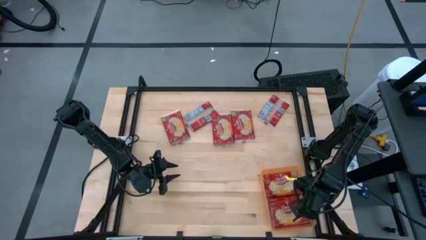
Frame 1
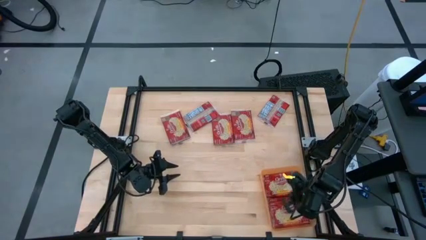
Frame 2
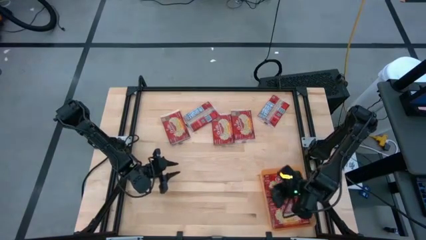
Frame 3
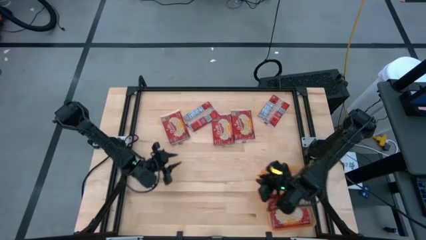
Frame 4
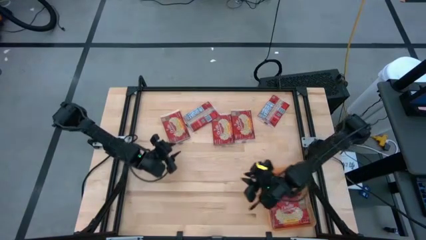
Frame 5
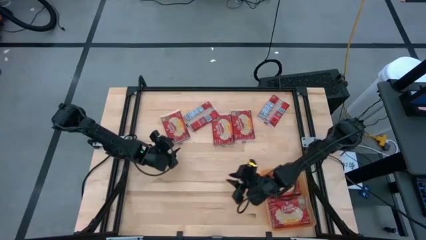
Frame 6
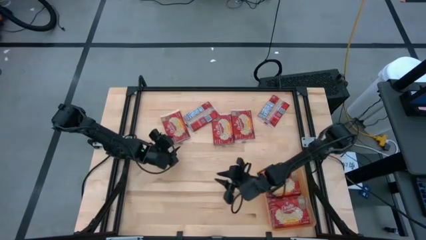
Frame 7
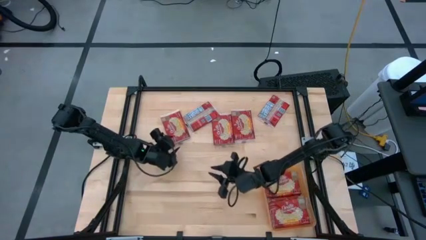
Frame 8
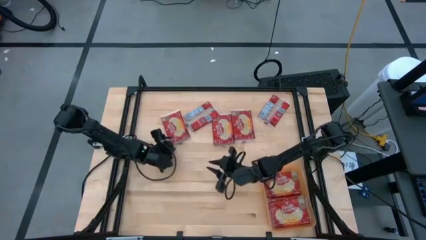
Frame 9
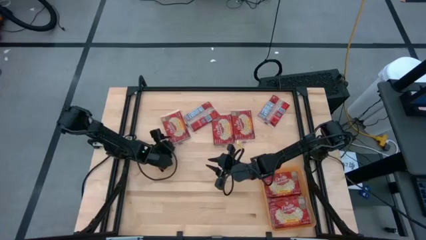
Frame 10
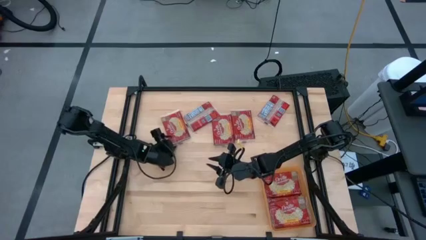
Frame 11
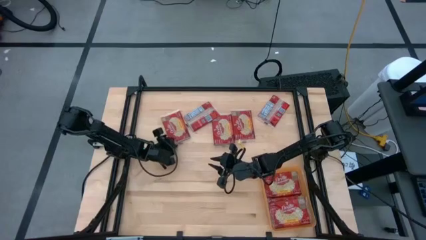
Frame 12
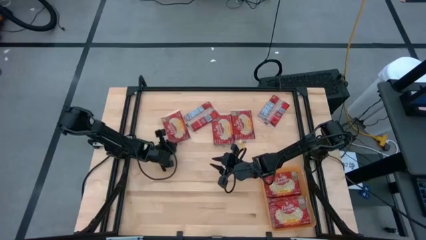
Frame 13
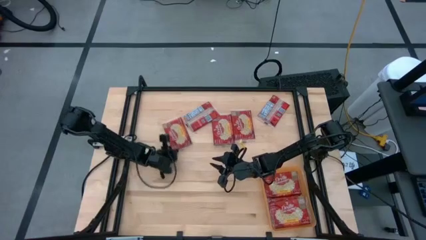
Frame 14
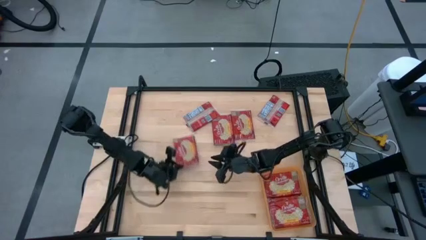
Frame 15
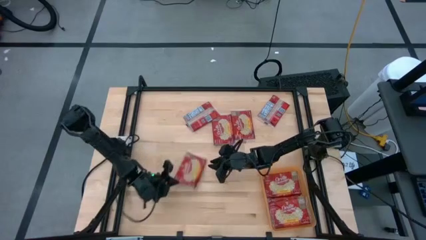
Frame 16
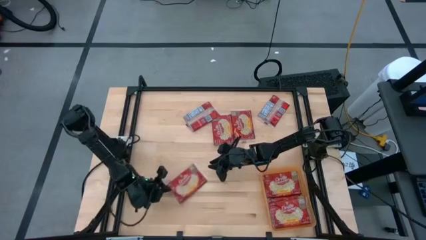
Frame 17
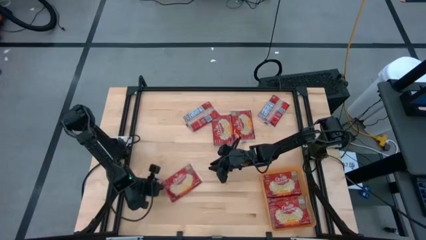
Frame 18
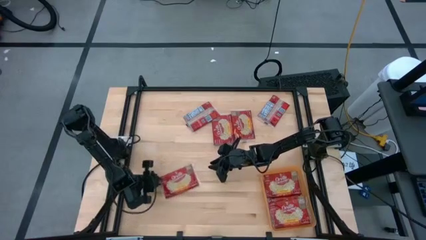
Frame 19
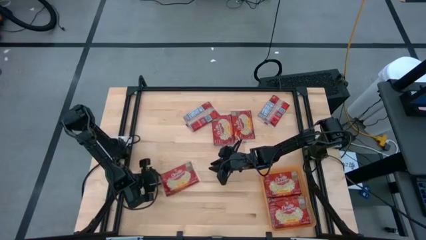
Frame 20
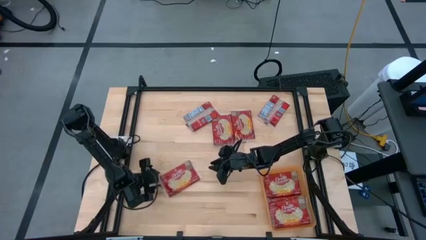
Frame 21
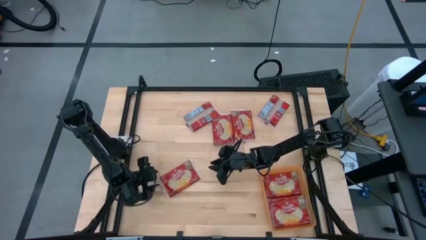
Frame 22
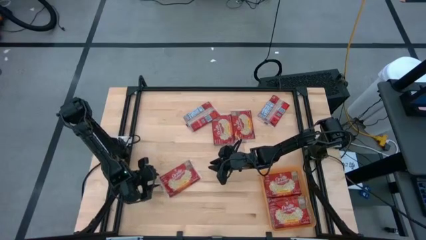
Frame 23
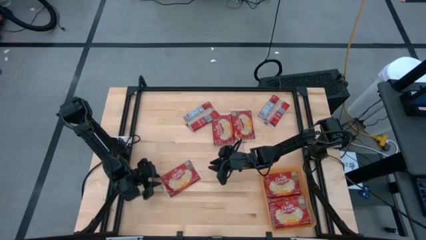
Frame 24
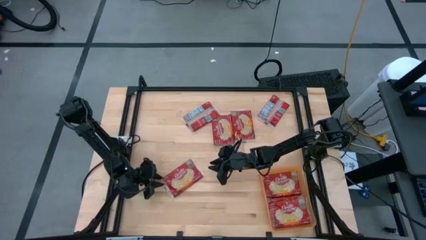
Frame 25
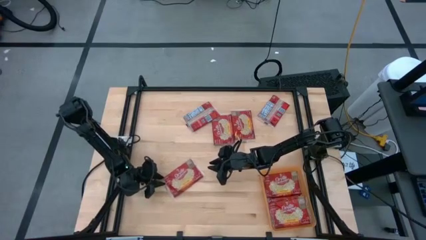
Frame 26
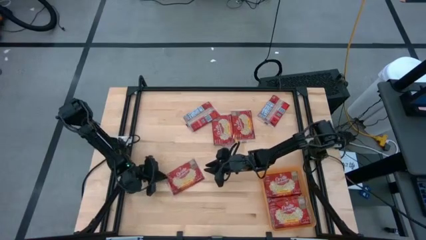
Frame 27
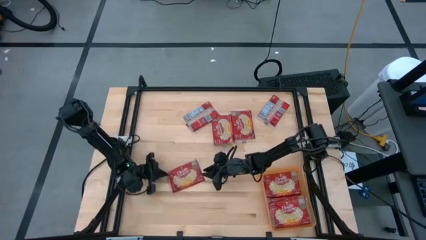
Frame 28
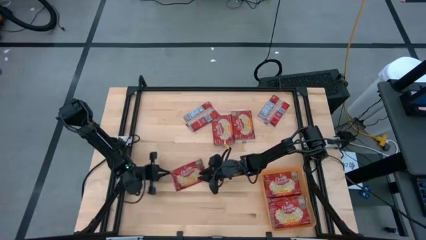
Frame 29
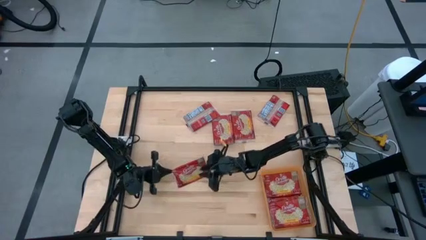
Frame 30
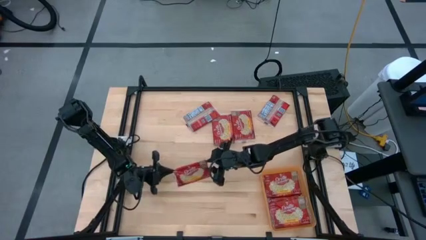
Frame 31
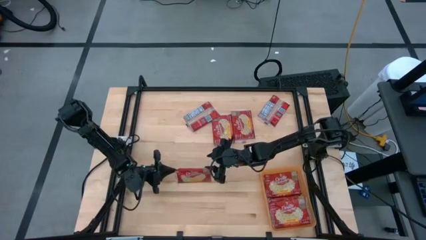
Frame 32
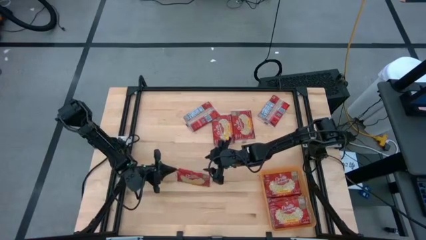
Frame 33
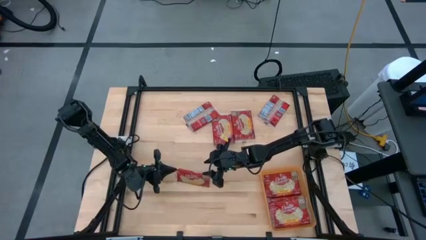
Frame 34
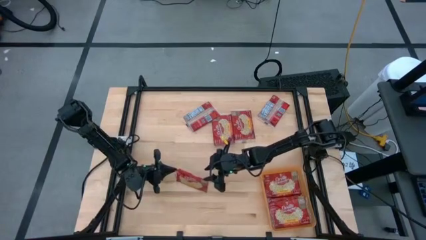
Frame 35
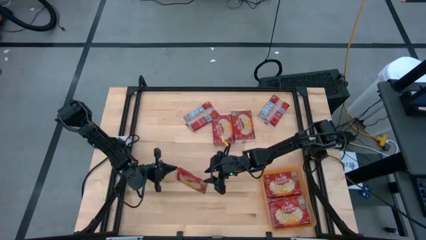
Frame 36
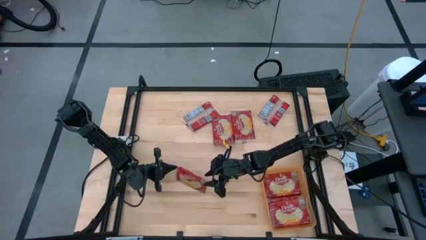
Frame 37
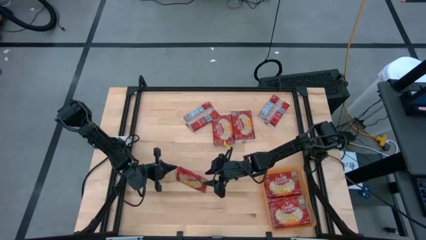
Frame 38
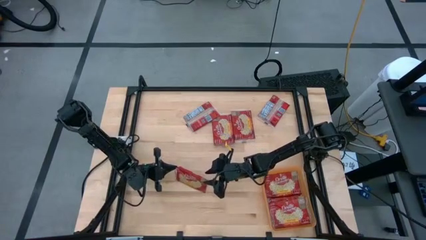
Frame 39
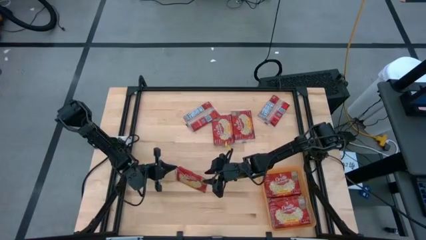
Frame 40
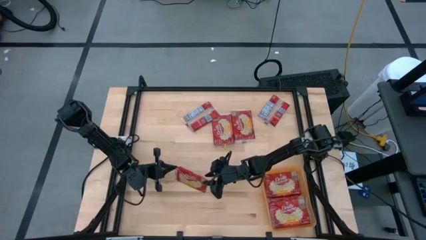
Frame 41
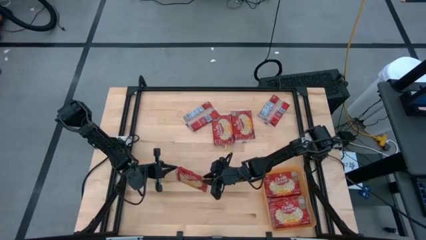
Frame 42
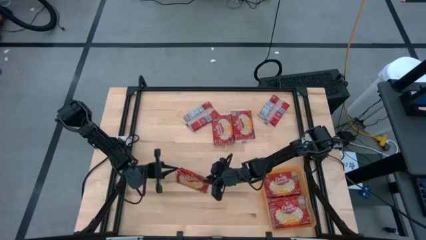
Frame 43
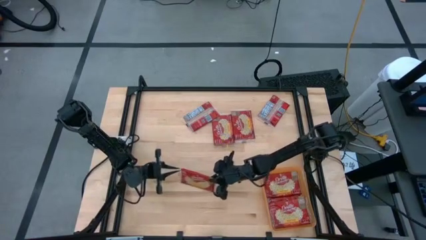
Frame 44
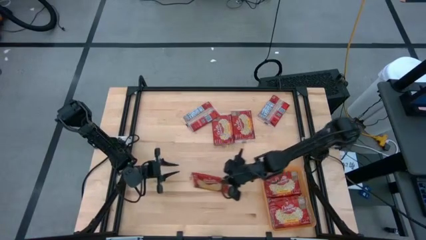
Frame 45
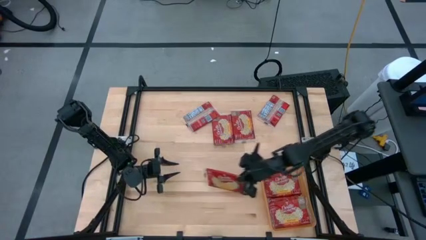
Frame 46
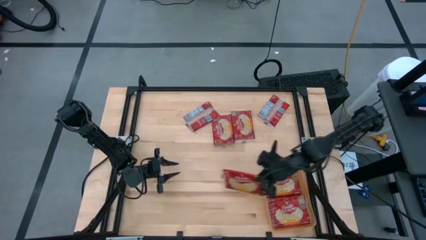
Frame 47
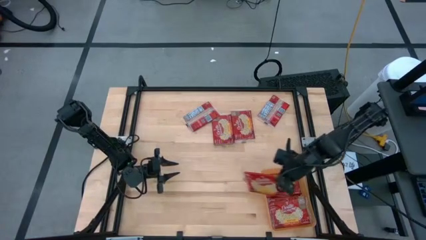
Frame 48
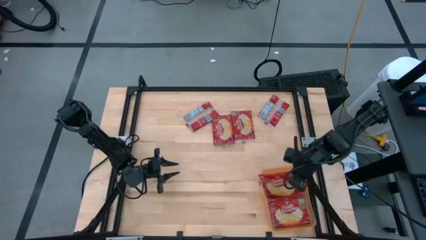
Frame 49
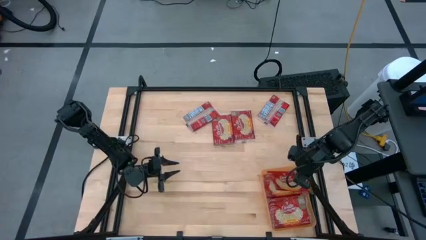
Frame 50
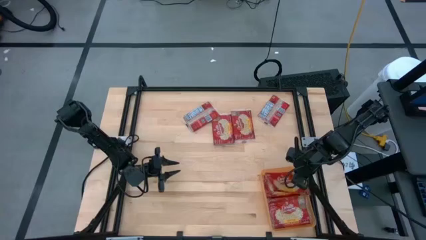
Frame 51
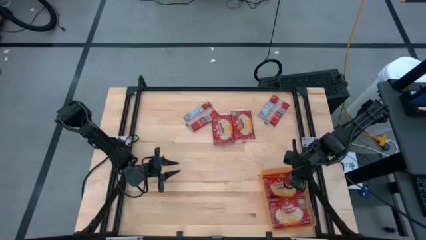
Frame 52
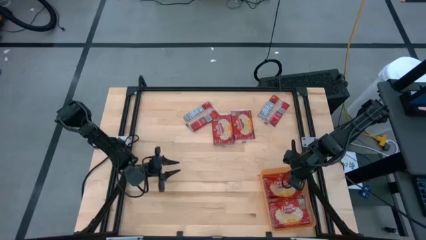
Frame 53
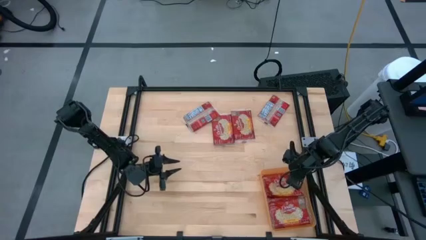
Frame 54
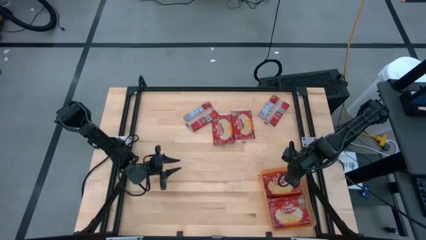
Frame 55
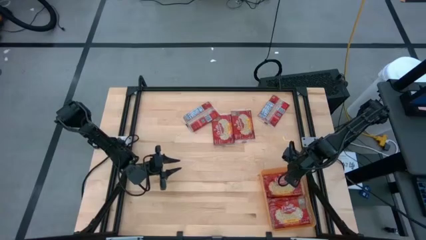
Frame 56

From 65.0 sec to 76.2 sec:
Task: Sort popcorn bags into baskets
Put the popcorn pack into the orange bin
